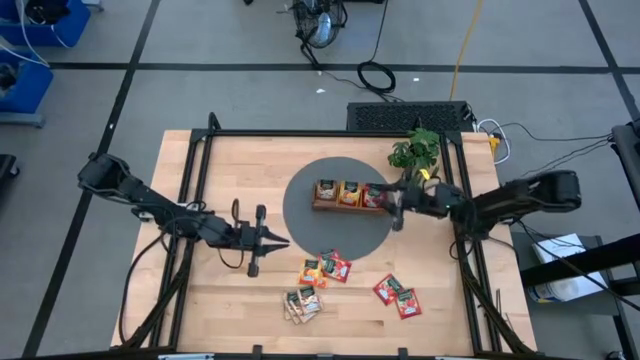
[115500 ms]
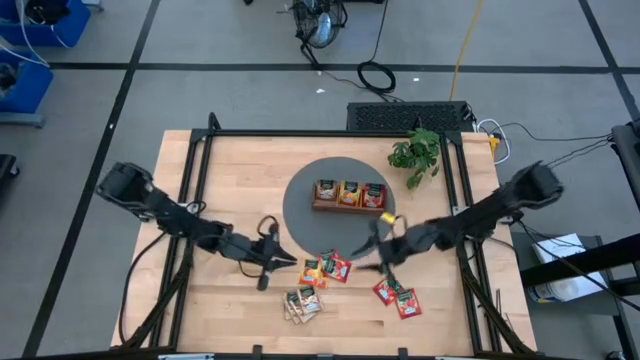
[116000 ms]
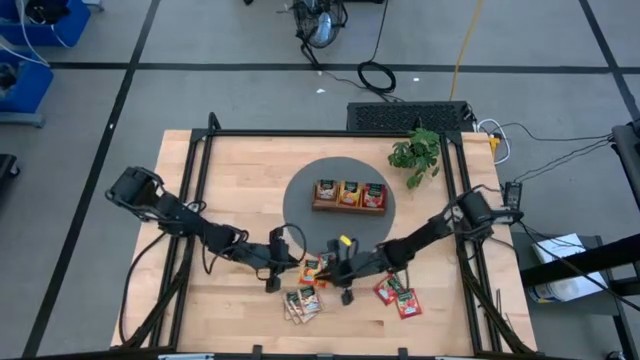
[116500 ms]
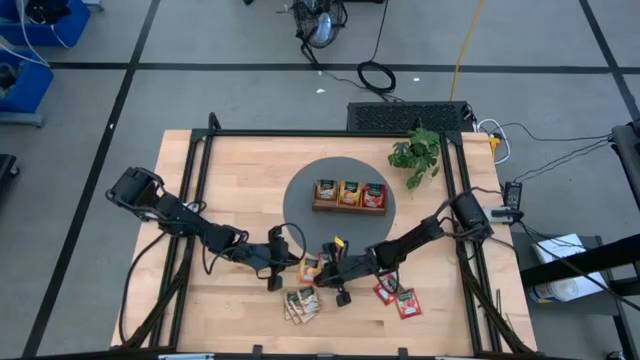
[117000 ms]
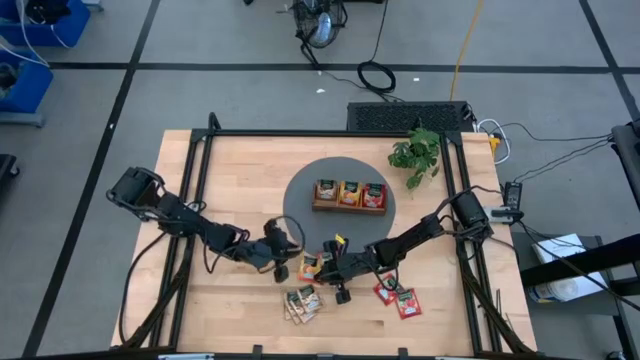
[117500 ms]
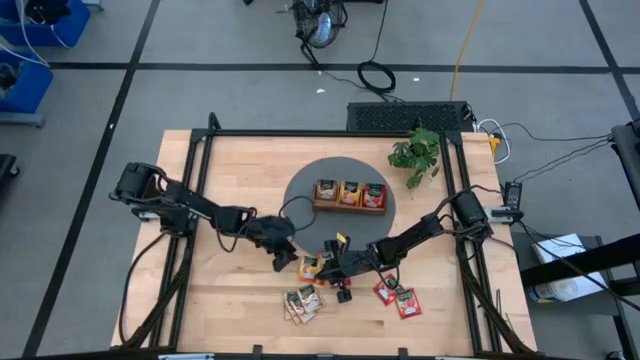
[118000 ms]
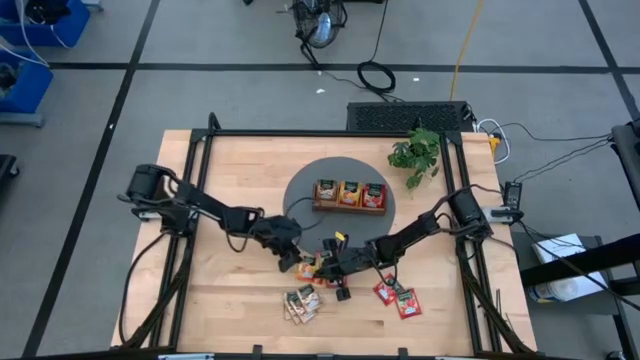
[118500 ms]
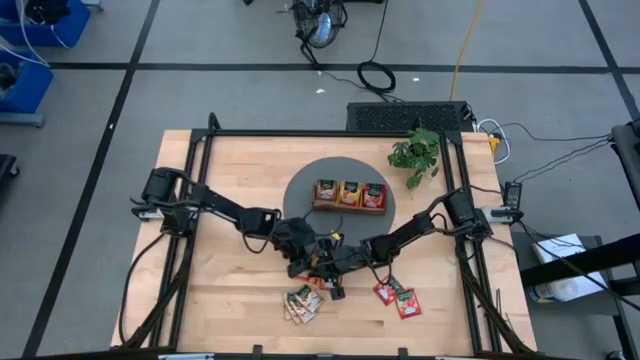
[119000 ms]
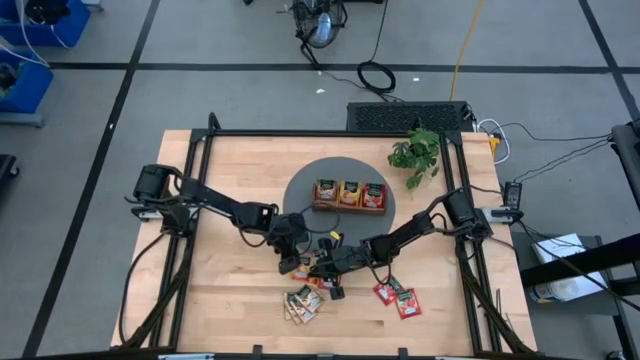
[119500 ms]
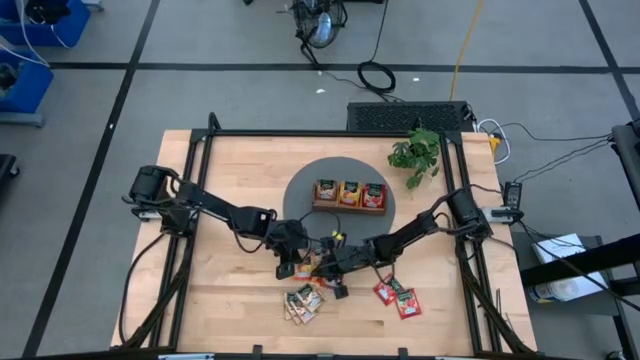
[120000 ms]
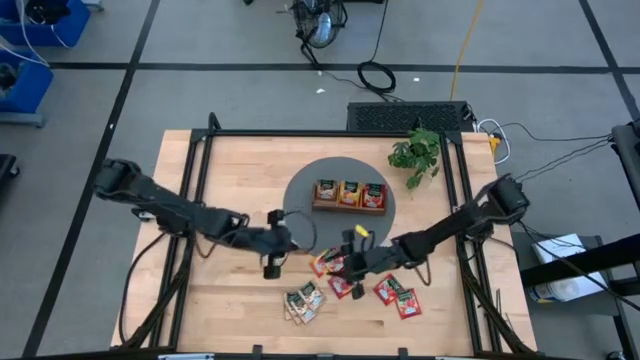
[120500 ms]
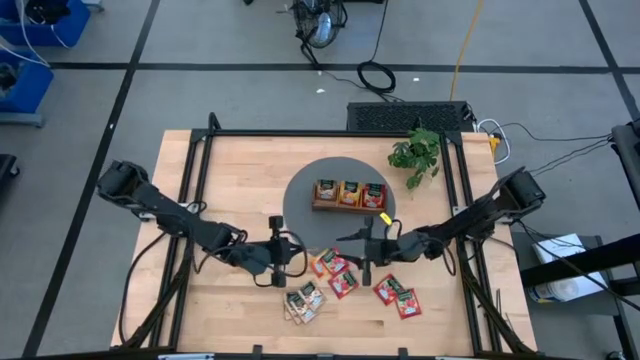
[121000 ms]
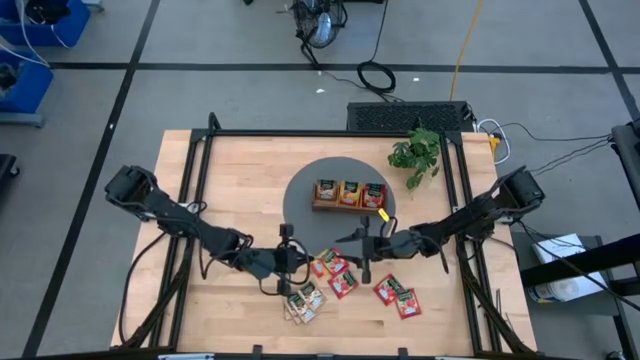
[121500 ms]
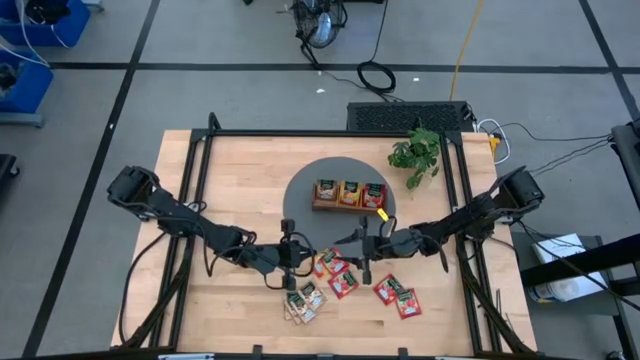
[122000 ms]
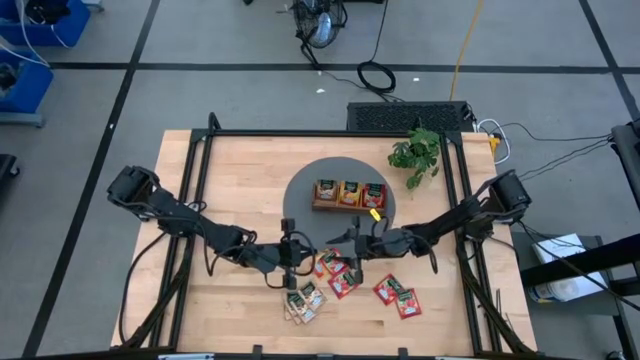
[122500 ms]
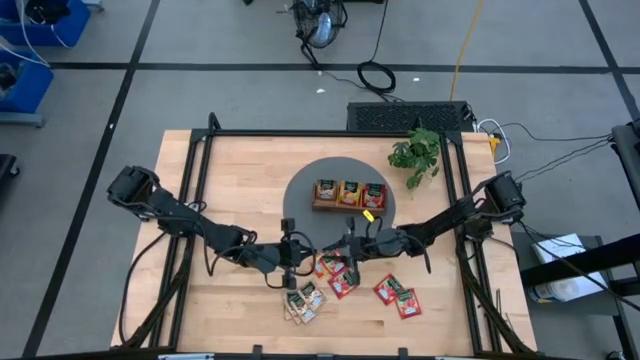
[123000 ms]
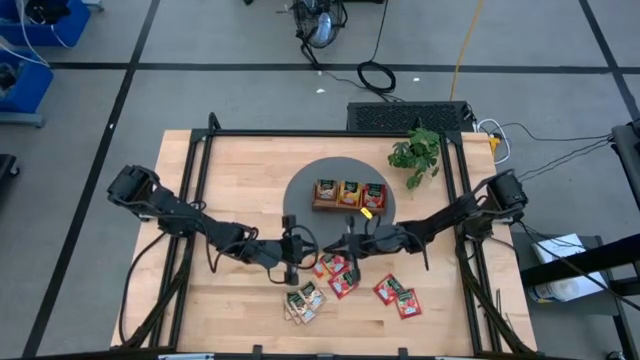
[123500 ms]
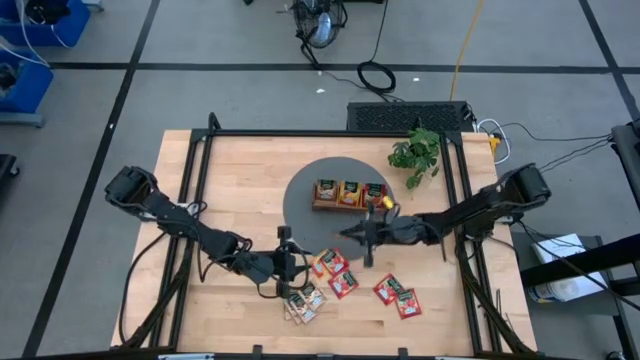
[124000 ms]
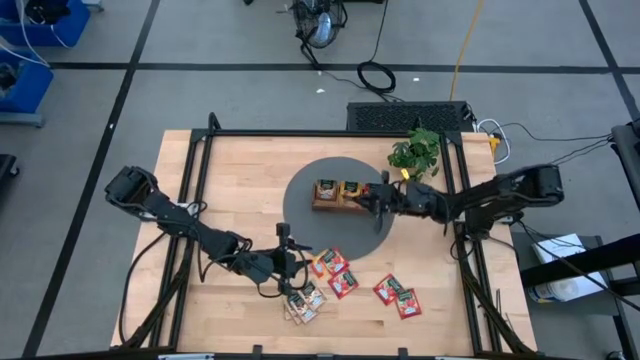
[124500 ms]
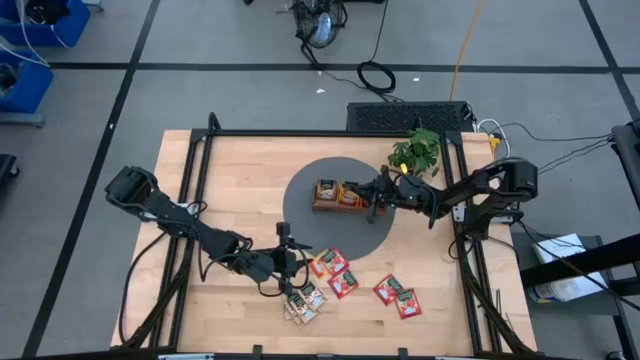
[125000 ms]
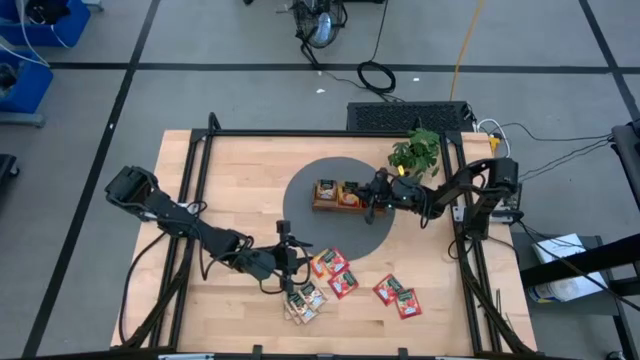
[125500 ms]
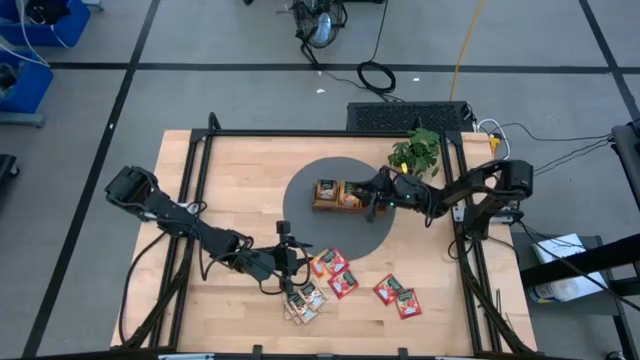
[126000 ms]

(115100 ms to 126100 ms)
Task: Pick & Place Tea
Put the yellow tea bag to the middle section into the wooden organizer

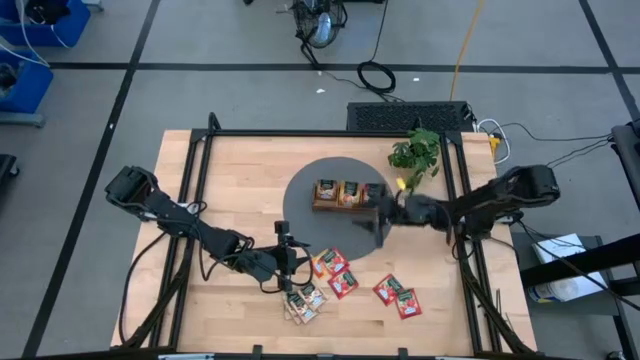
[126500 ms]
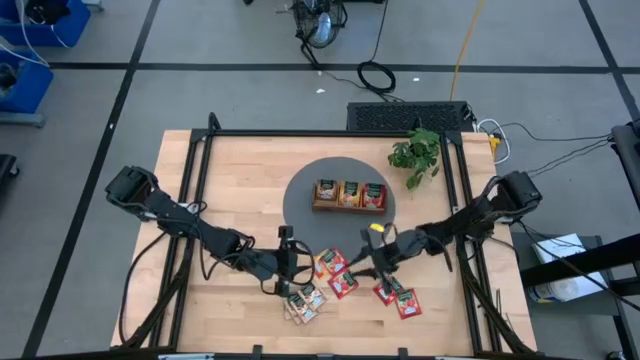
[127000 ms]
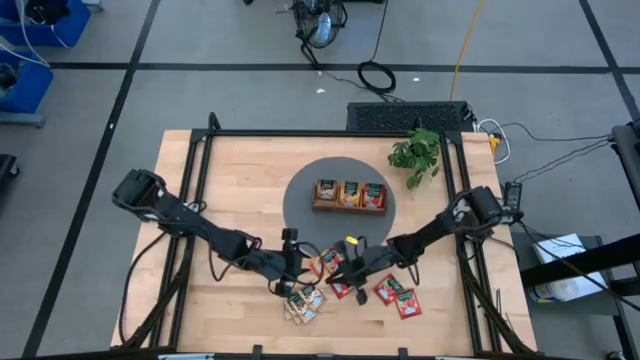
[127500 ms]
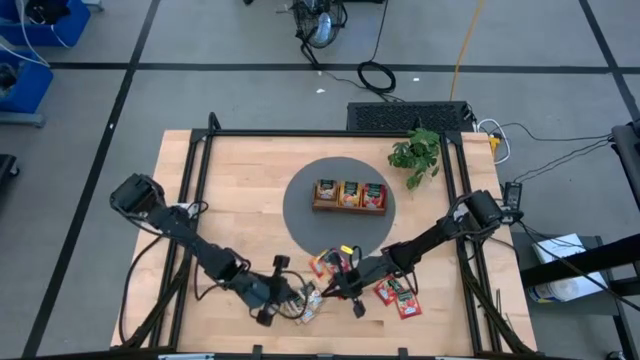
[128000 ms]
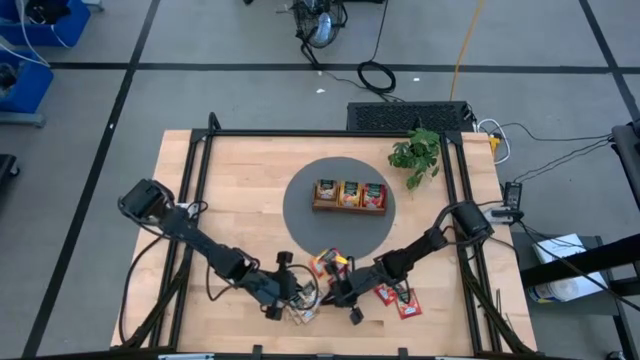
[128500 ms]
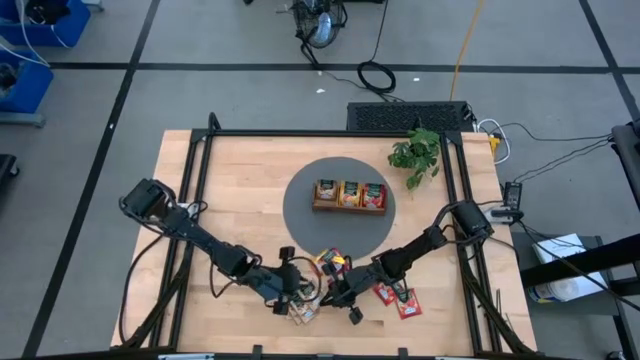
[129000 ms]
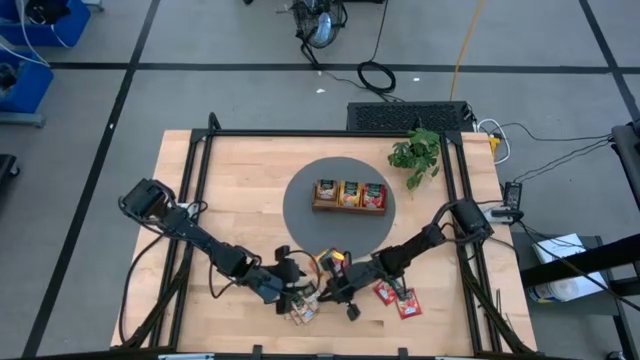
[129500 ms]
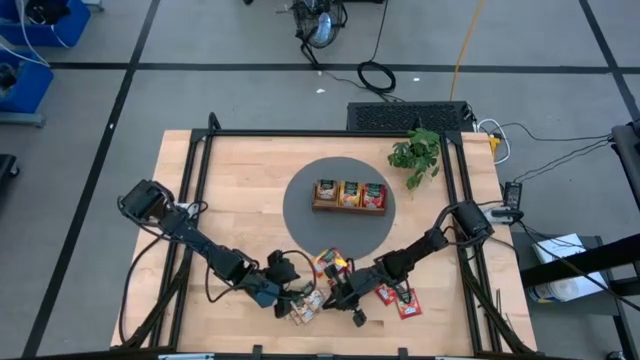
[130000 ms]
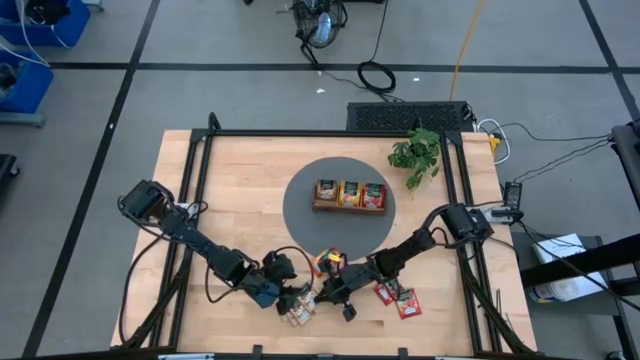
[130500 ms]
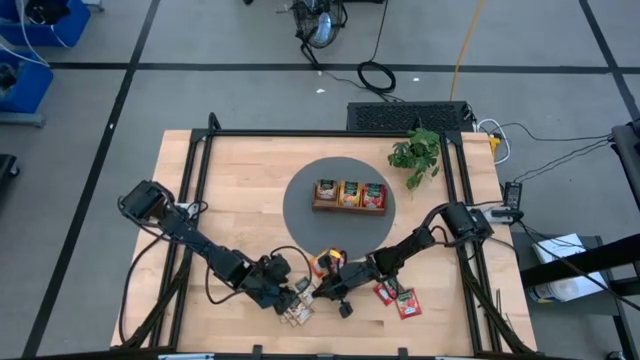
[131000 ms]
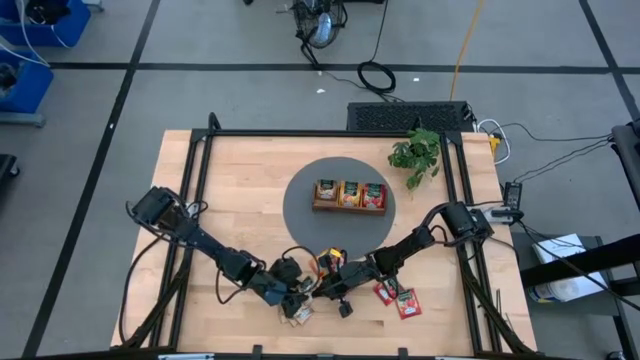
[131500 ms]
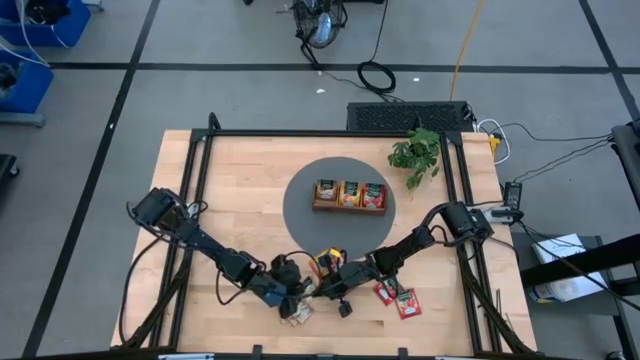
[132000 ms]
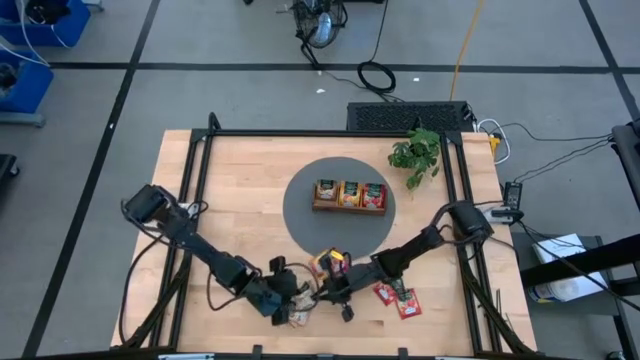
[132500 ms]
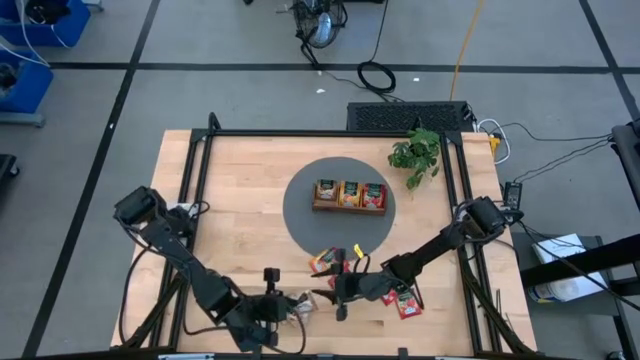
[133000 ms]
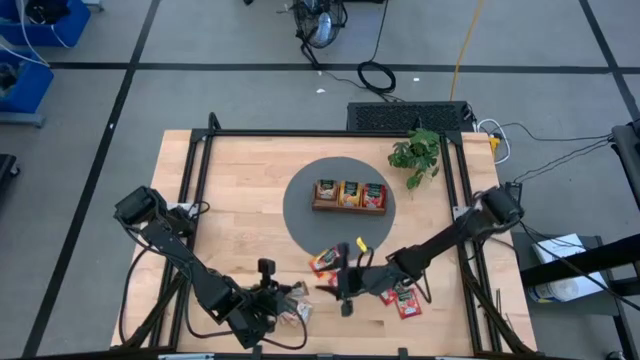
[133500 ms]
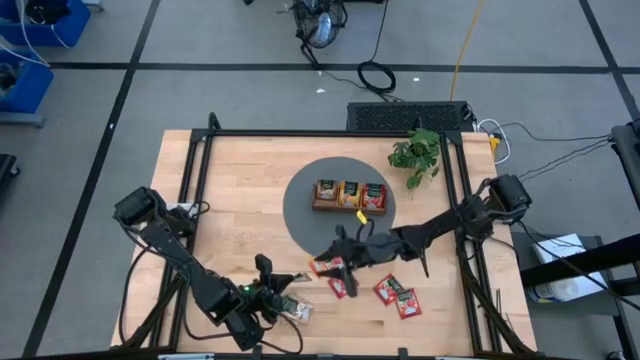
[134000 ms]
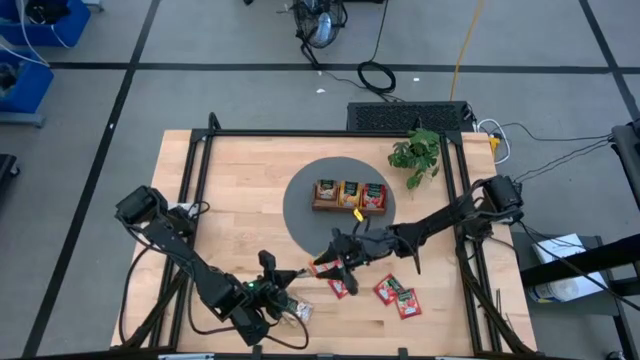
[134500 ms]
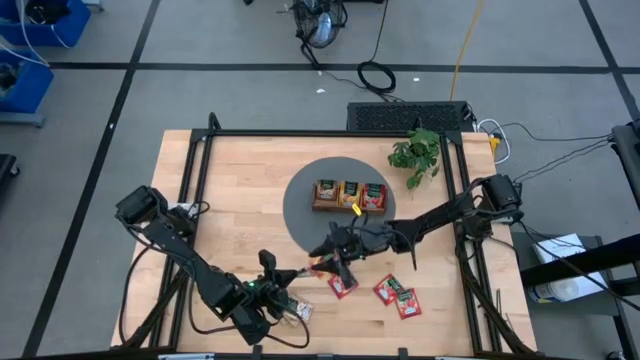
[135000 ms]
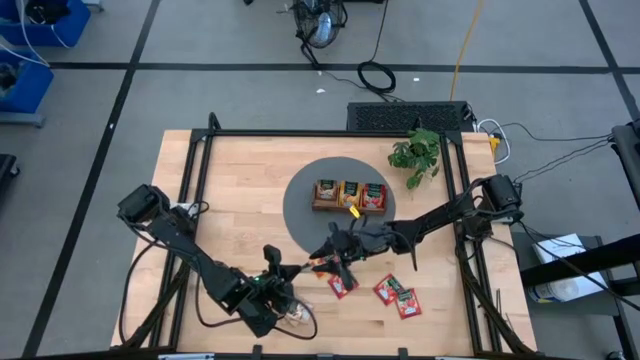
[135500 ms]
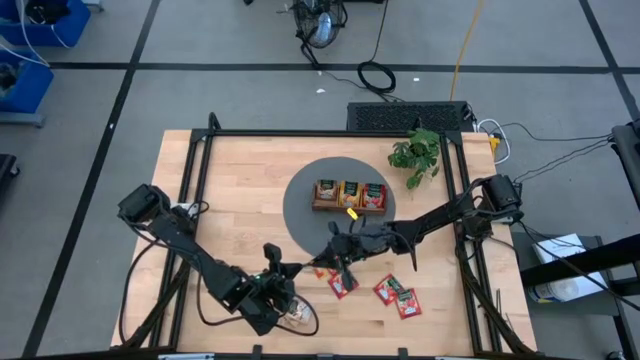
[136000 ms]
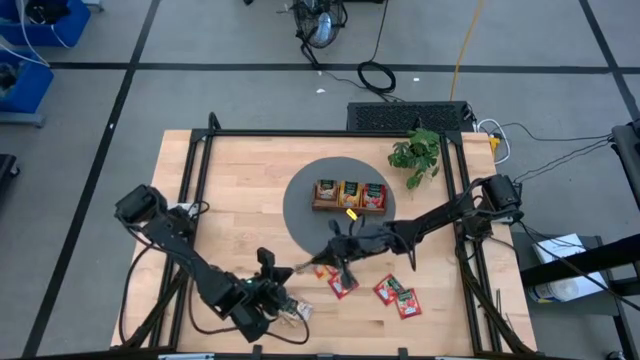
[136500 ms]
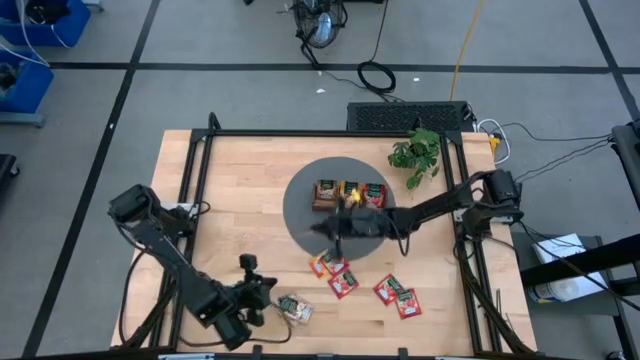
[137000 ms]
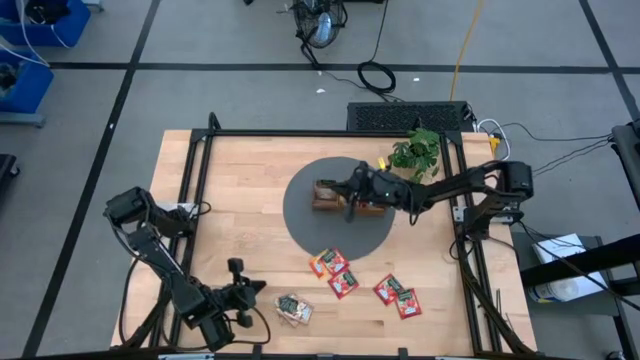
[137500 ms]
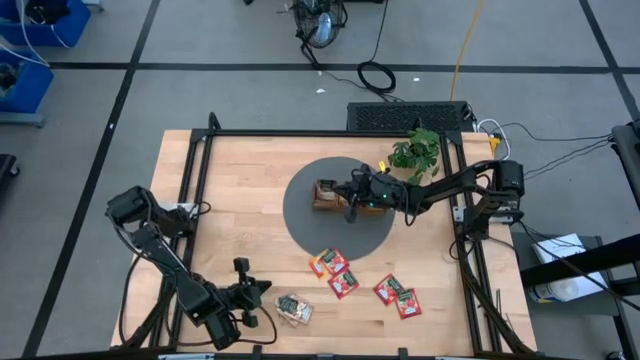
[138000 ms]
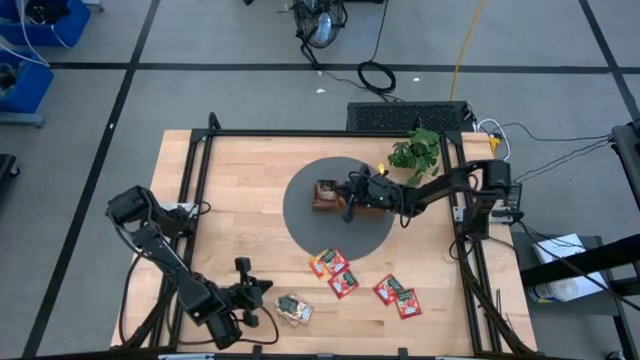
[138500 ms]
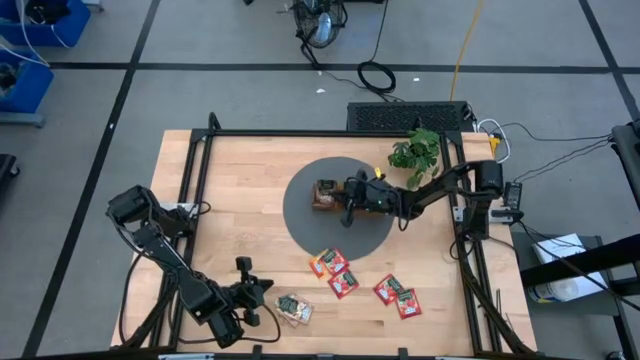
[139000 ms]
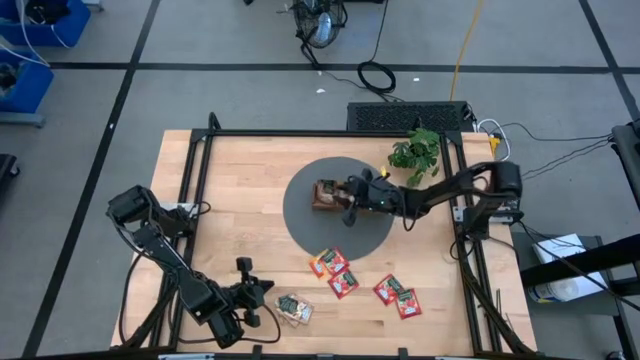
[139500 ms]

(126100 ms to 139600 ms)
Put the brown tea bag to the left section into the wooden organizer
